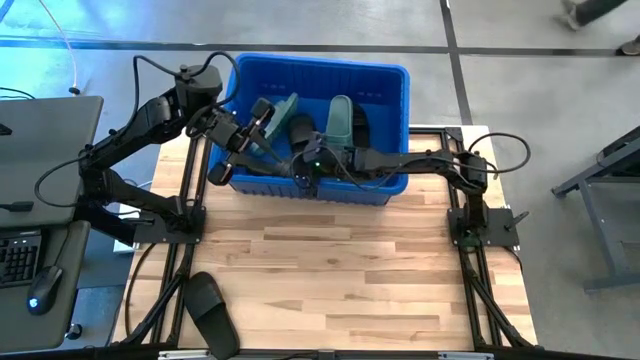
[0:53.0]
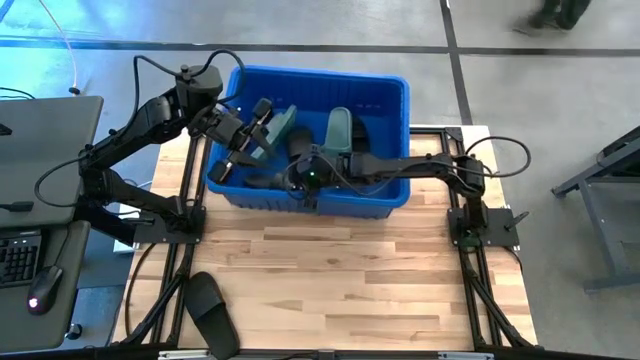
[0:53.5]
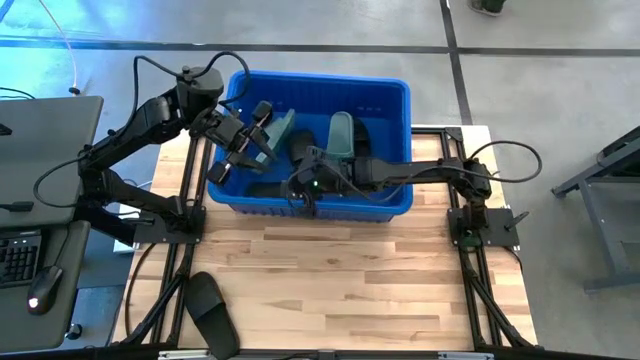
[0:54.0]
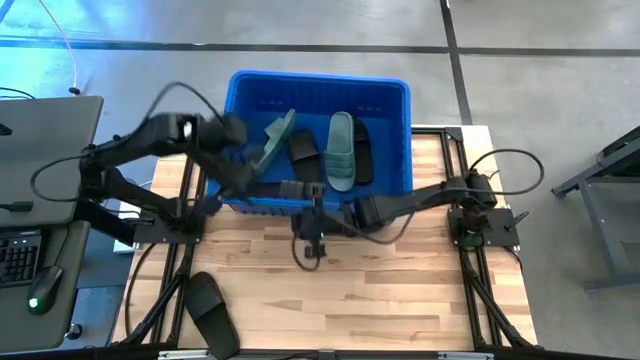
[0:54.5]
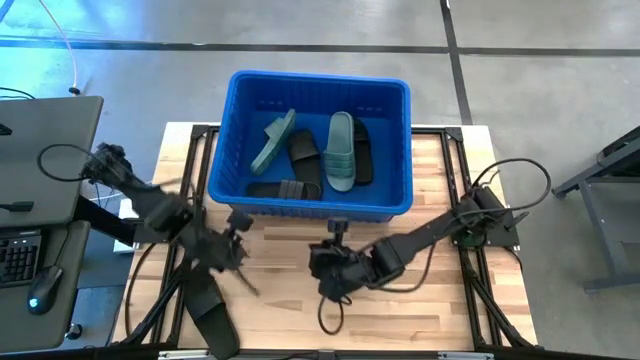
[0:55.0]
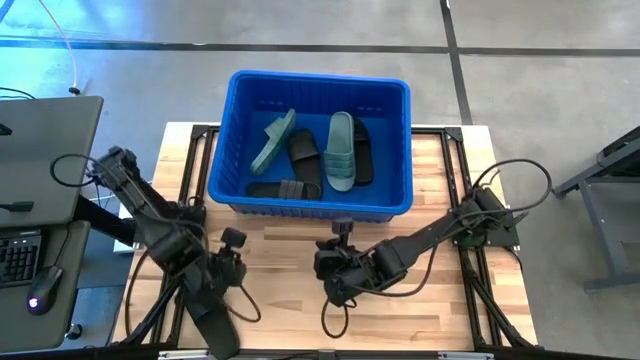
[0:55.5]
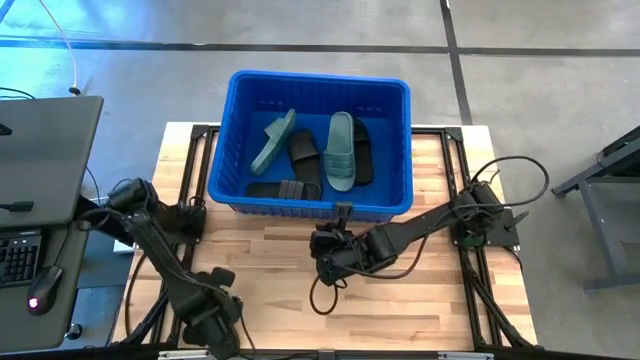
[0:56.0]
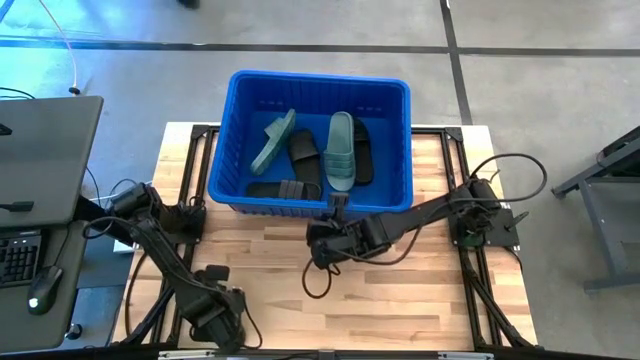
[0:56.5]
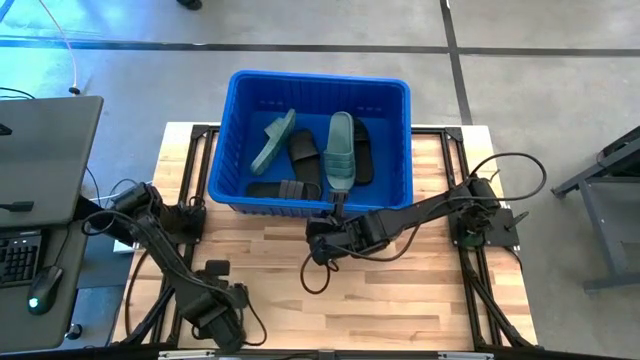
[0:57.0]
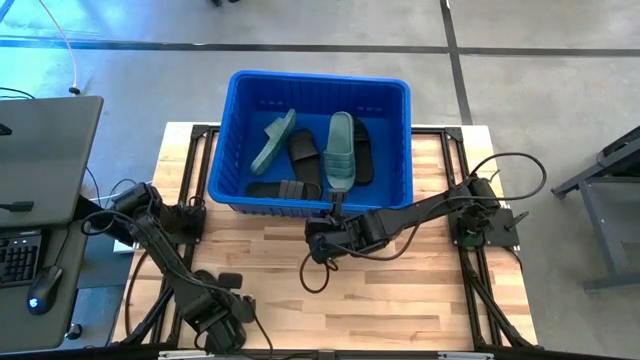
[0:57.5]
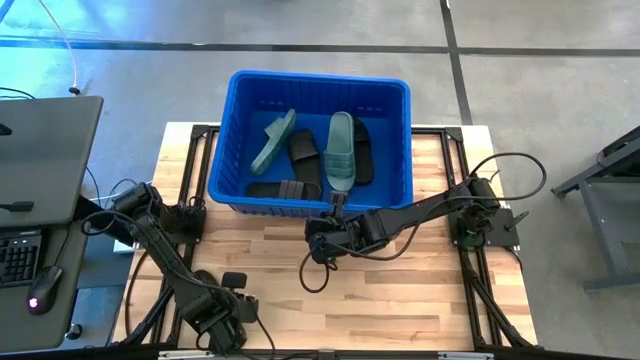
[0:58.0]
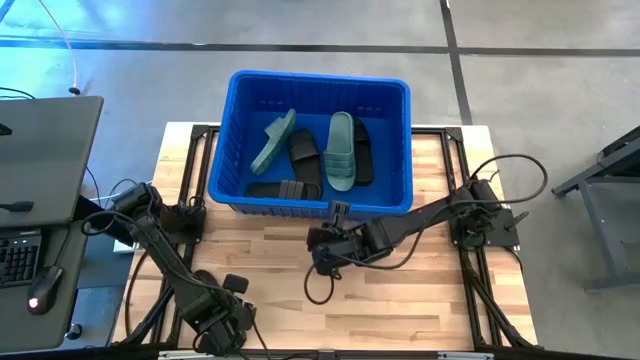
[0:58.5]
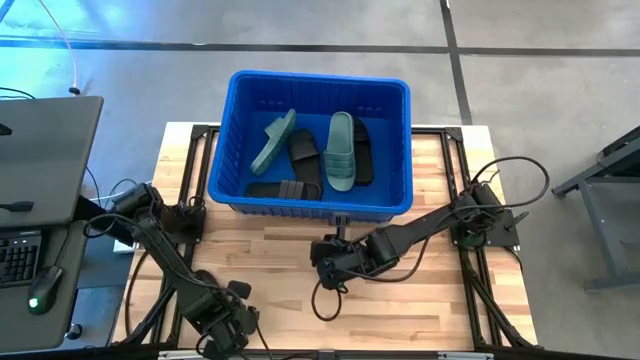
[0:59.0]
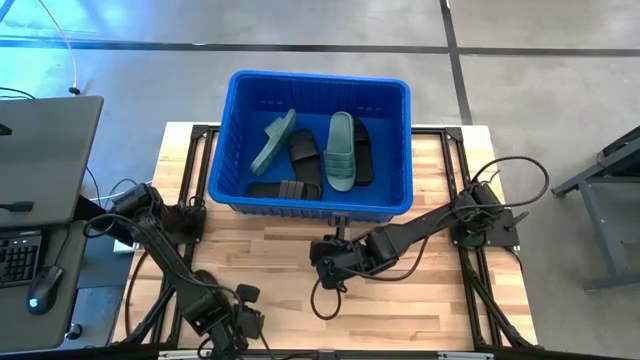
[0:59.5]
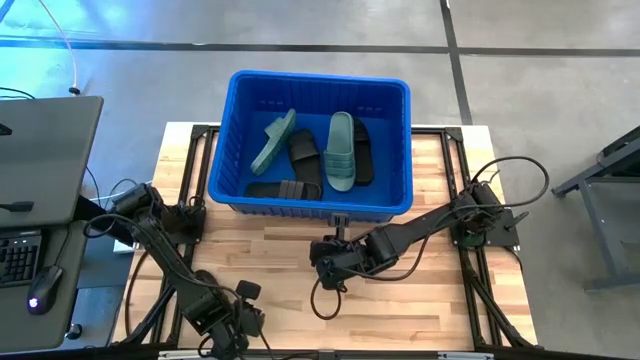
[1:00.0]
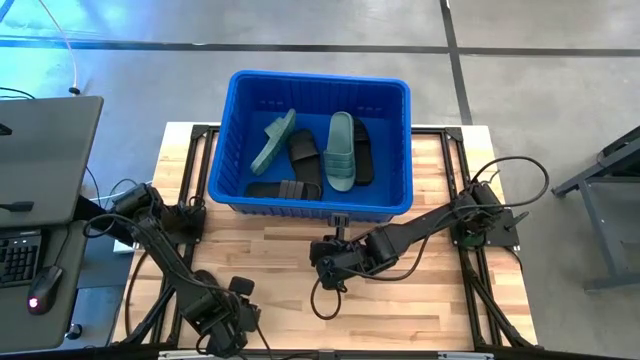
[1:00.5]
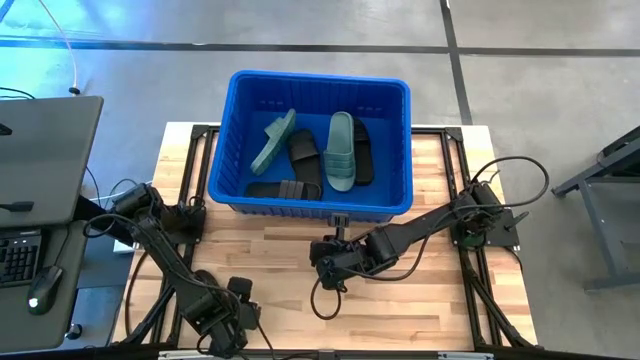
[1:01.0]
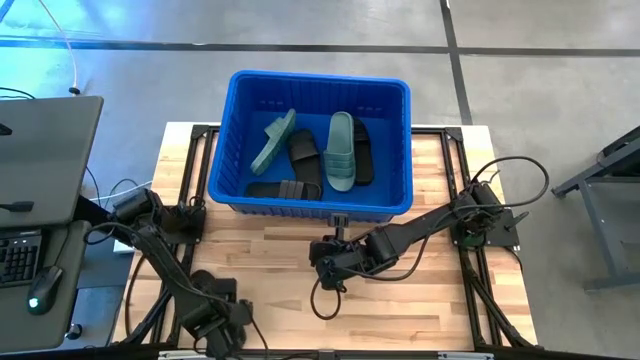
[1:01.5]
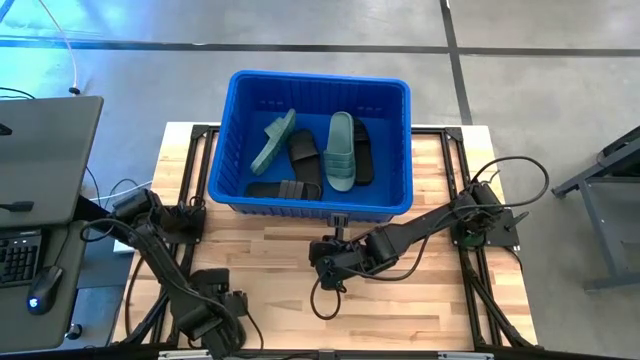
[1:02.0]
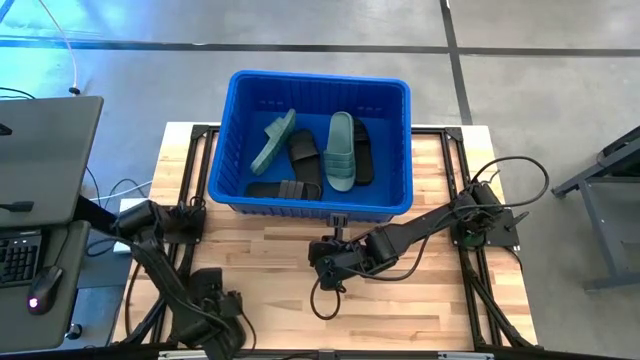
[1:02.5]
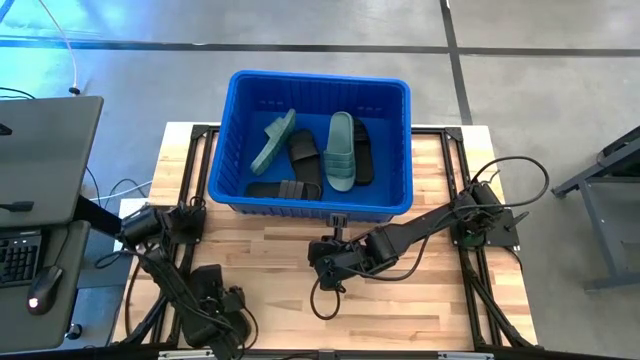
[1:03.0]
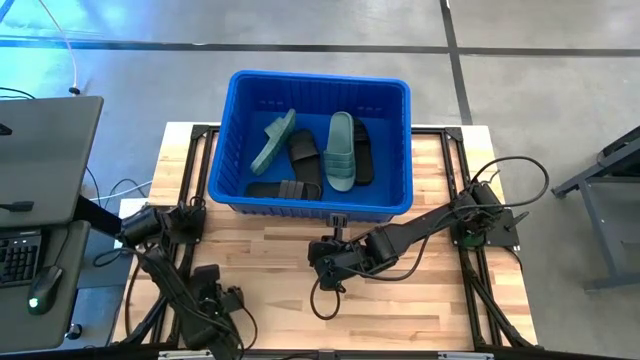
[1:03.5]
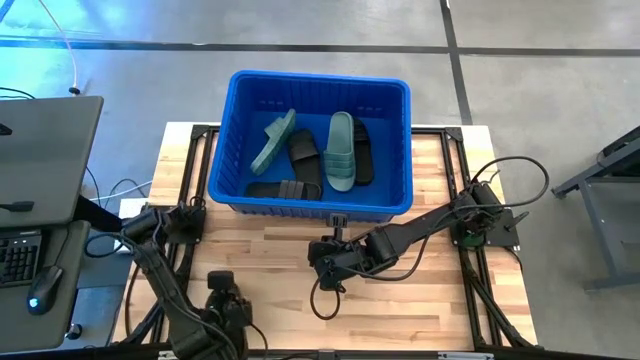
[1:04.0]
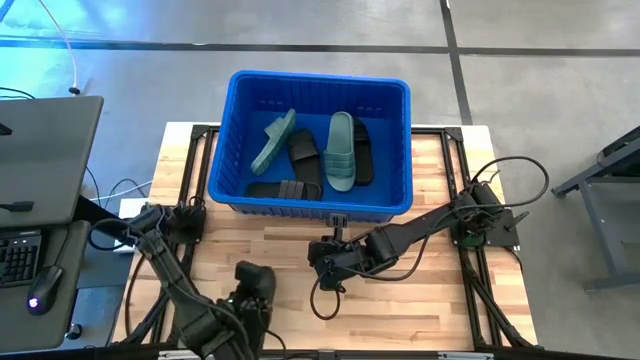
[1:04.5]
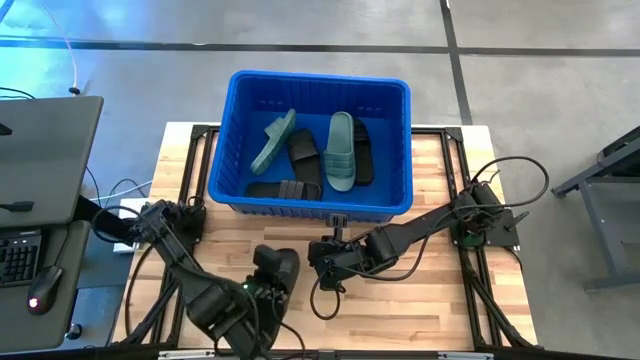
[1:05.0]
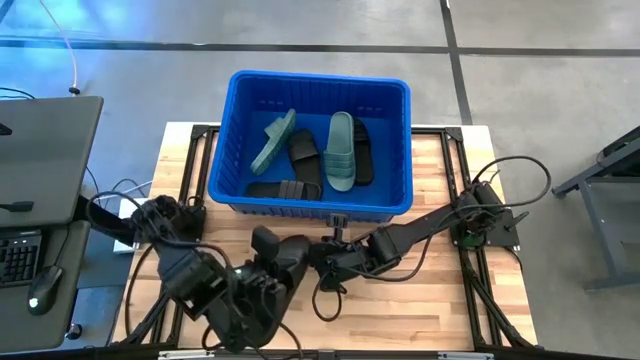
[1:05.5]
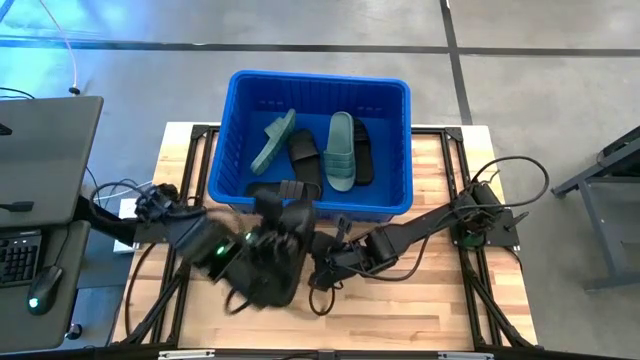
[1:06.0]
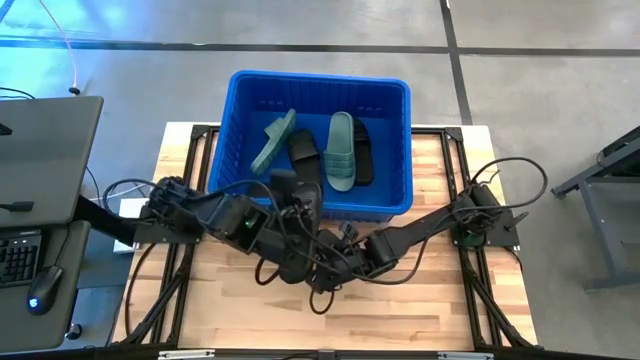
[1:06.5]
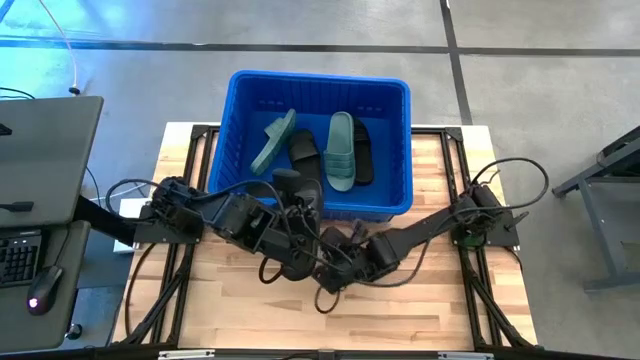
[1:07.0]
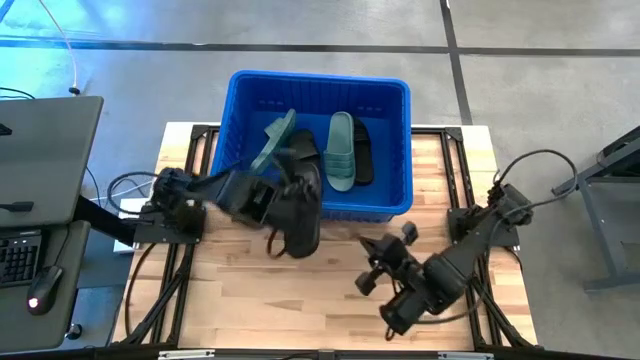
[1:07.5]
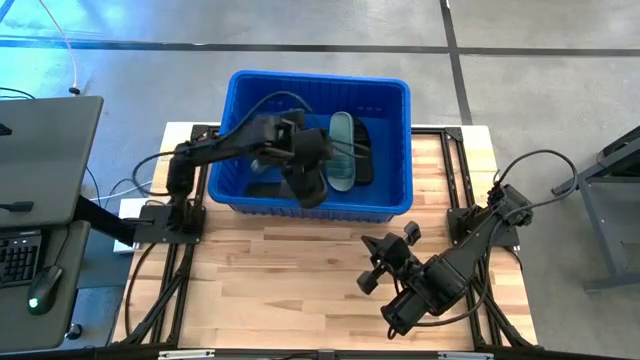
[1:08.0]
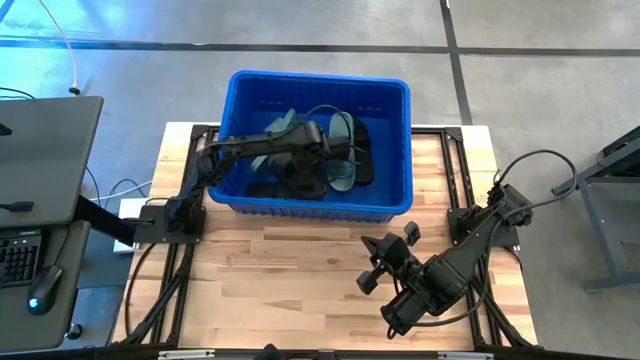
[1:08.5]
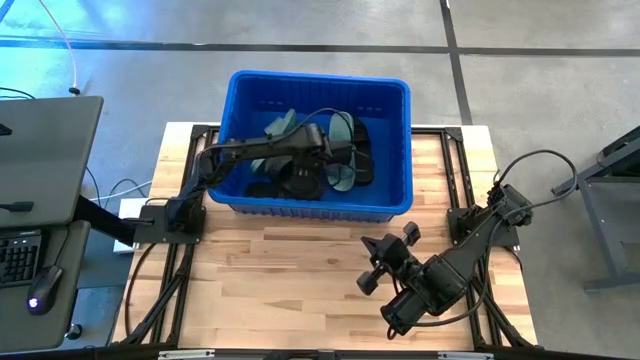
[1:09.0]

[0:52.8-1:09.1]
Task: Pick and place slides into bin
Put the black slide into the blue container

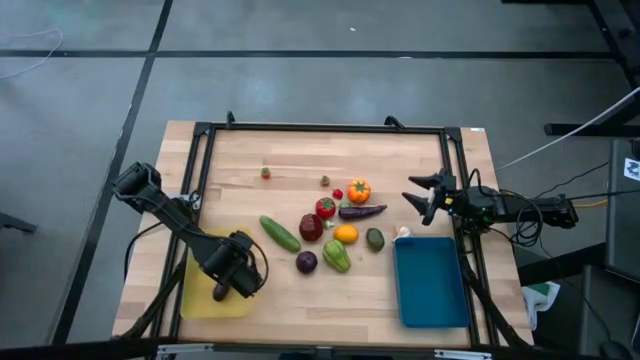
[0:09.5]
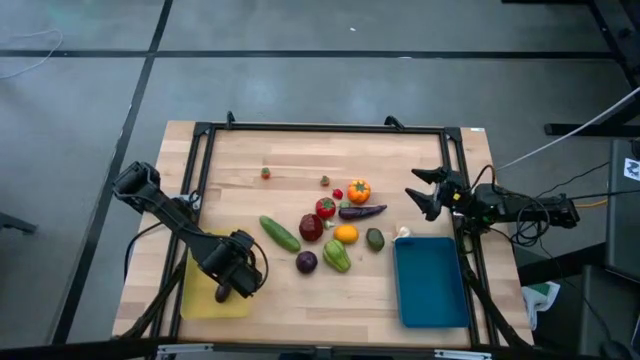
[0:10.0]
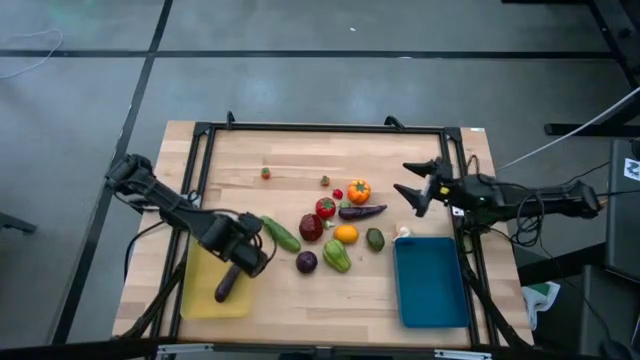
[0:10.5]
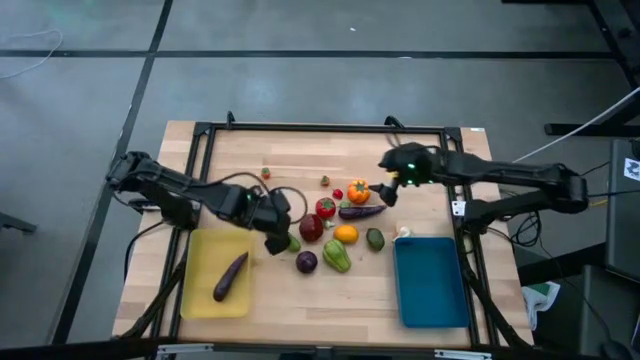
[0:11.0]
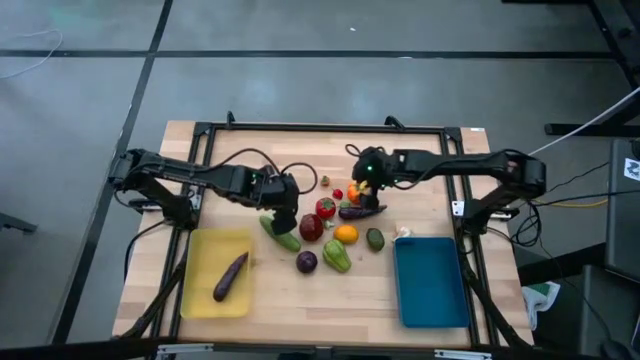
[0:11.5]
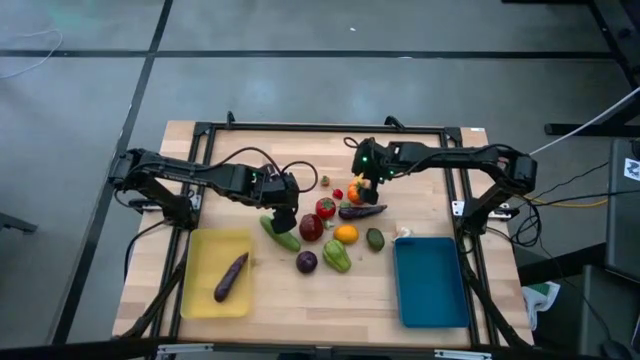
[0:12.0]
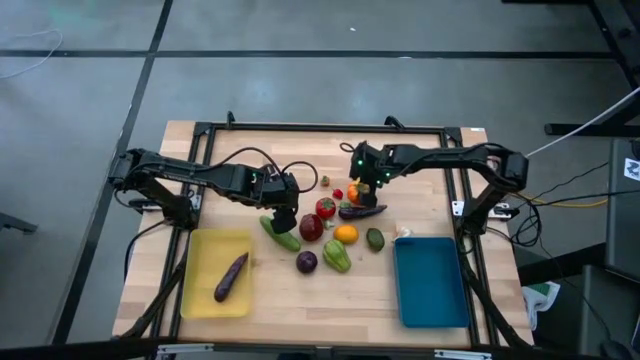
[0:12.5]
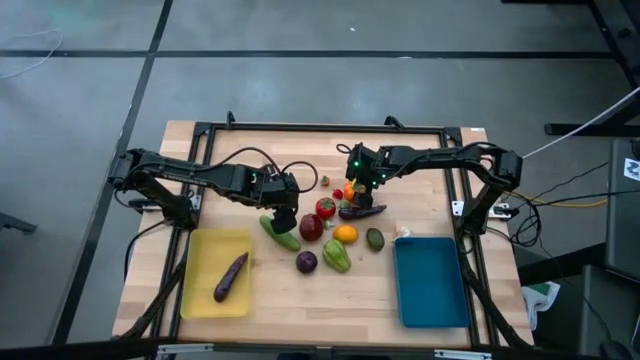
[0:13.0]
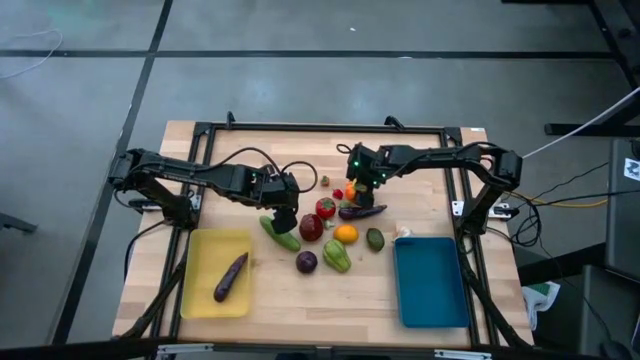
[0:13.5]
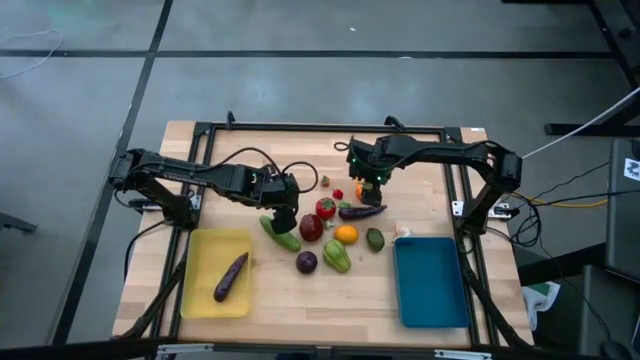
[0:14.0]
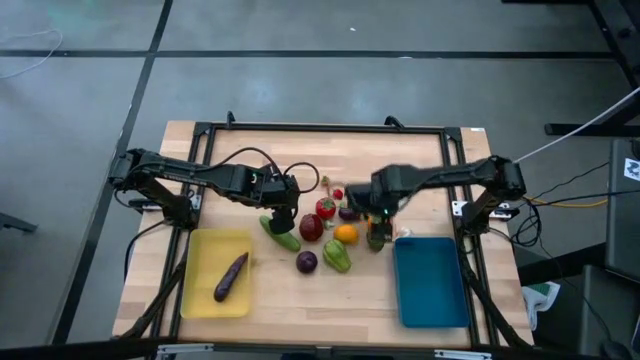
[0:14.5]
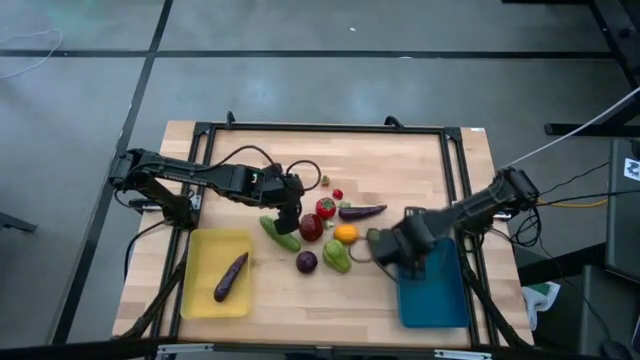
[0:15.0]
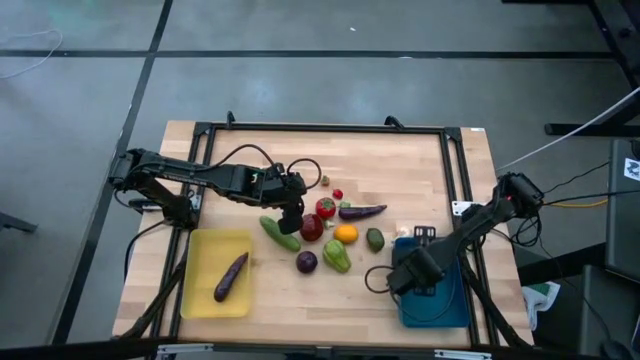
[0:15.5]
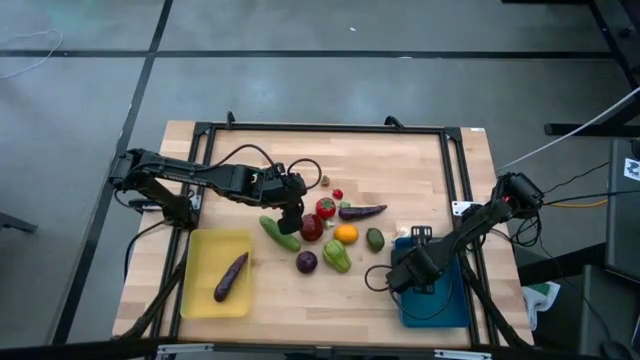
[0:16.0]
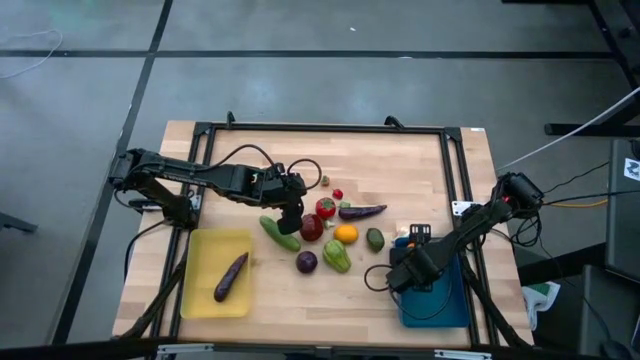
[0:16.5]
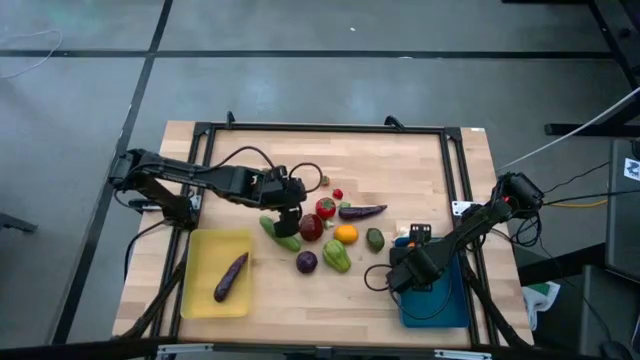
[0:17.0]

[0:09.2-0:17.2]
Task: Sort produce into baskets
Put the yellow tomato into the blue bin
